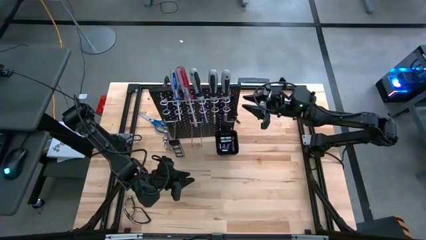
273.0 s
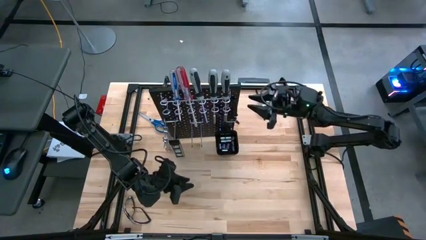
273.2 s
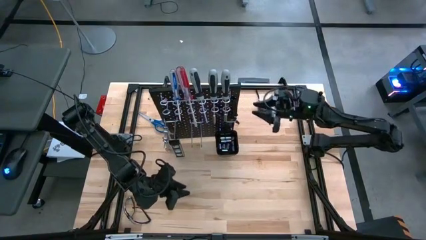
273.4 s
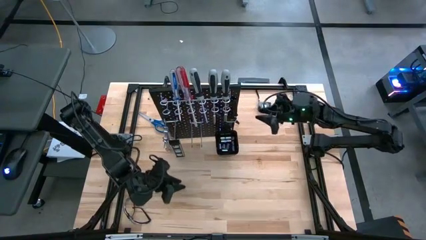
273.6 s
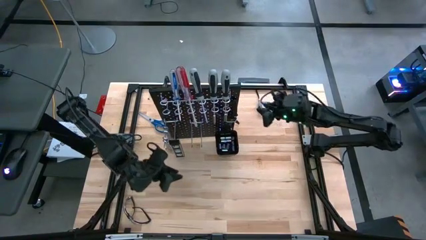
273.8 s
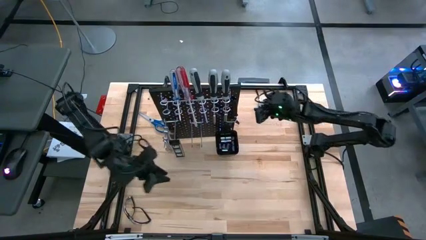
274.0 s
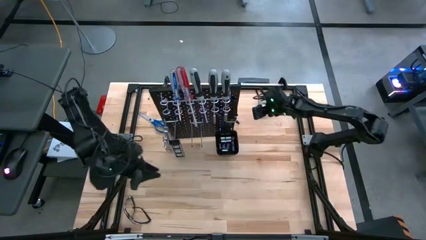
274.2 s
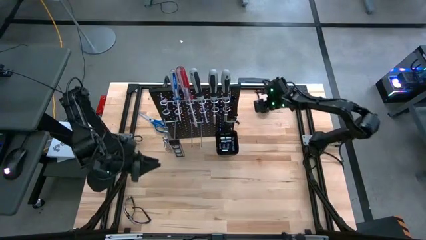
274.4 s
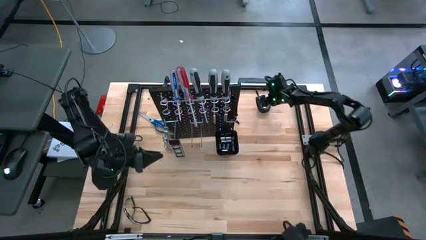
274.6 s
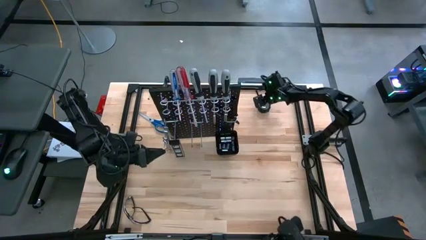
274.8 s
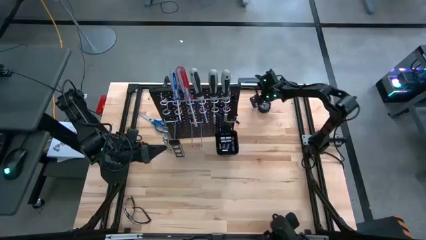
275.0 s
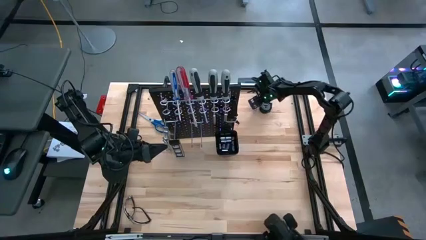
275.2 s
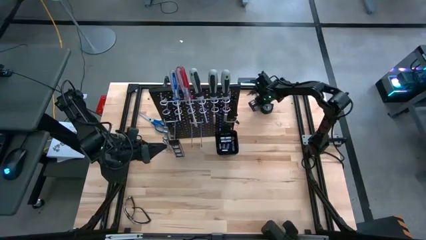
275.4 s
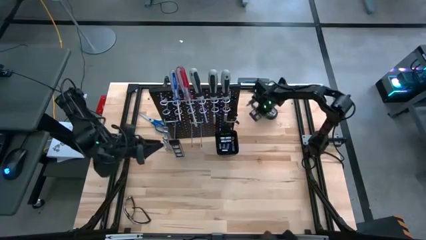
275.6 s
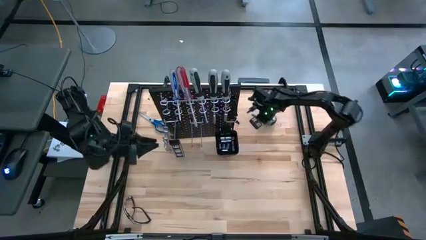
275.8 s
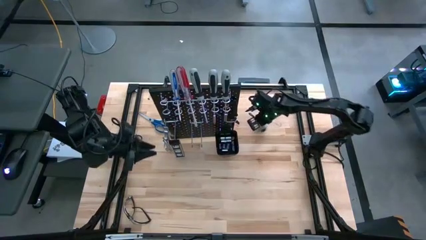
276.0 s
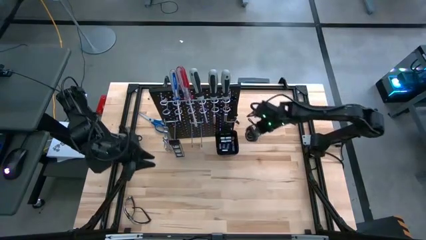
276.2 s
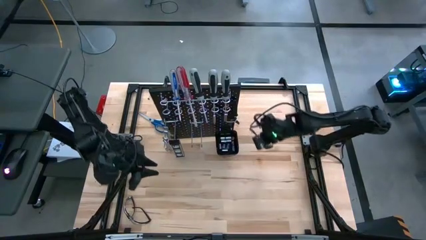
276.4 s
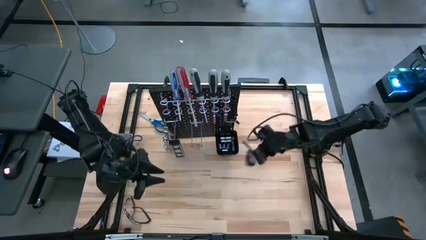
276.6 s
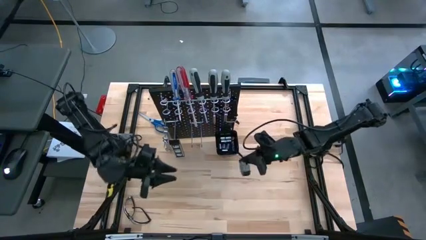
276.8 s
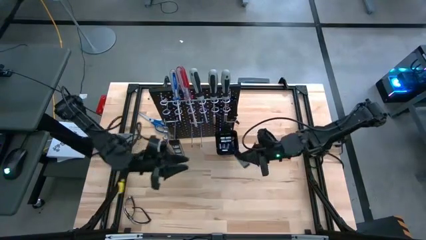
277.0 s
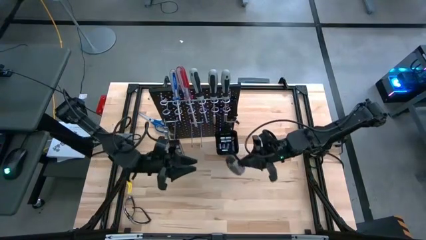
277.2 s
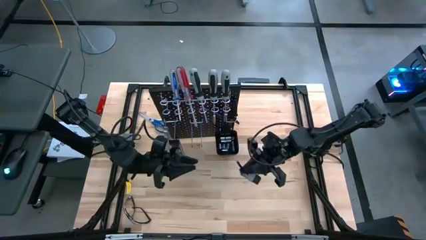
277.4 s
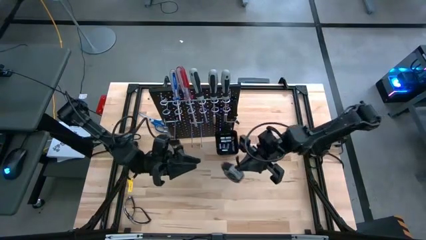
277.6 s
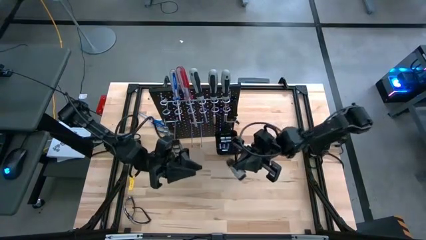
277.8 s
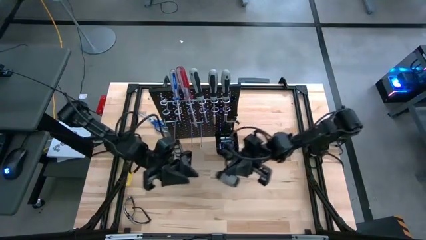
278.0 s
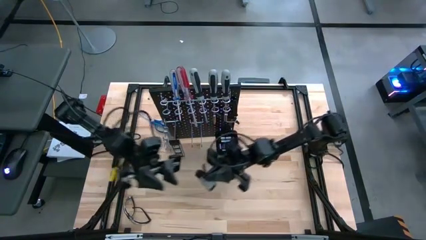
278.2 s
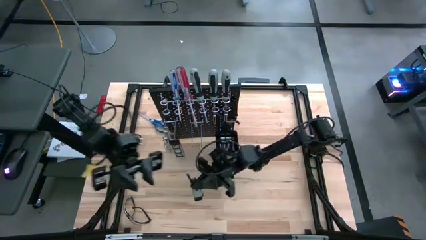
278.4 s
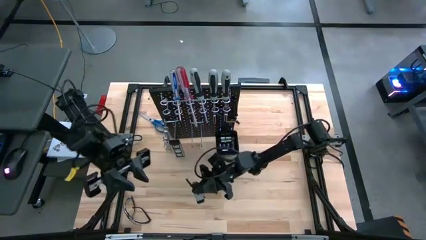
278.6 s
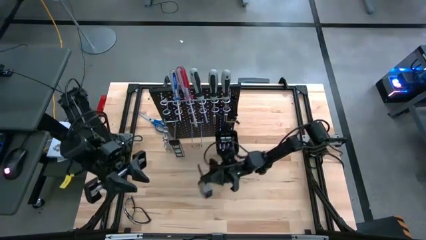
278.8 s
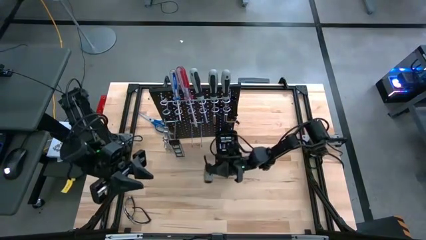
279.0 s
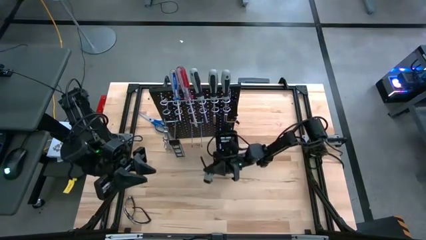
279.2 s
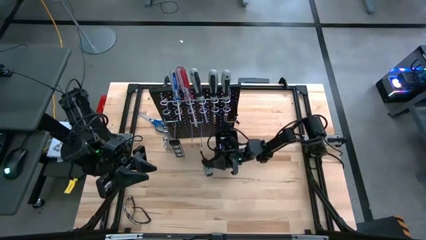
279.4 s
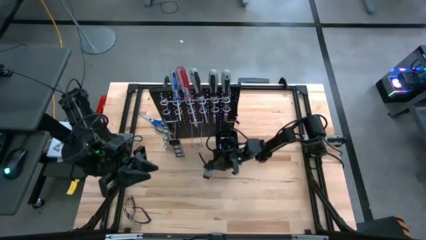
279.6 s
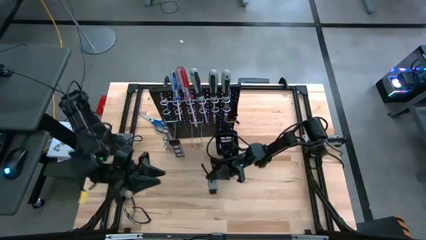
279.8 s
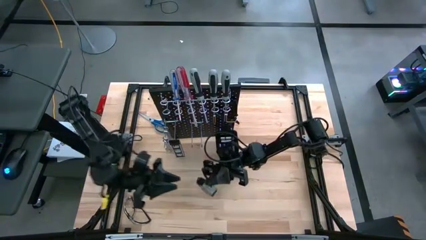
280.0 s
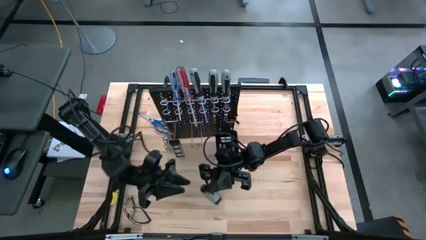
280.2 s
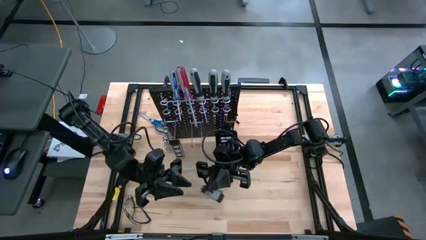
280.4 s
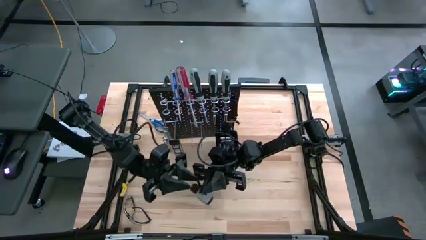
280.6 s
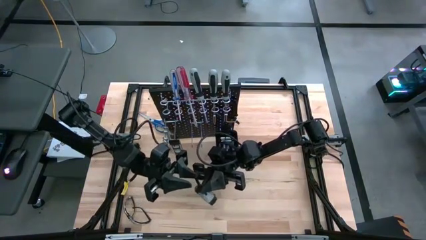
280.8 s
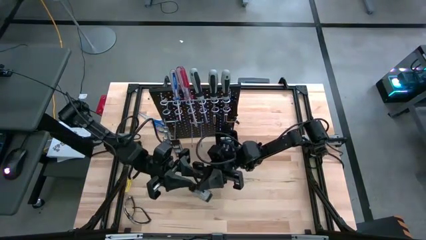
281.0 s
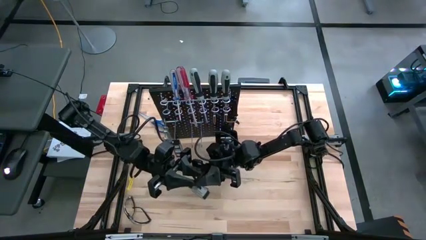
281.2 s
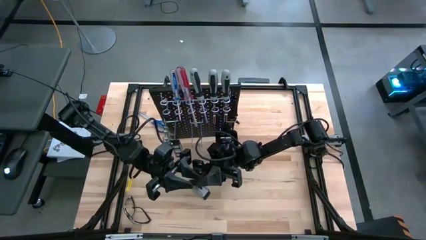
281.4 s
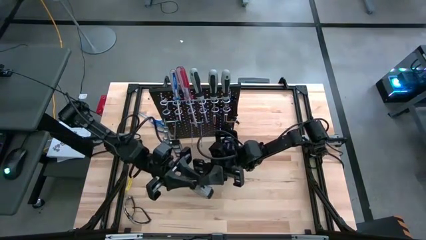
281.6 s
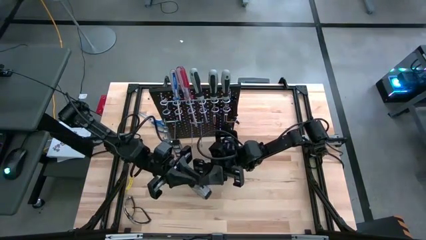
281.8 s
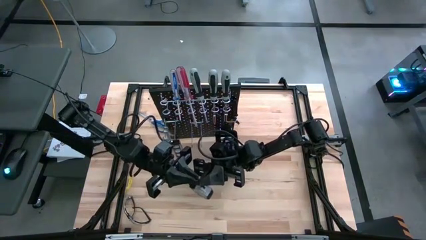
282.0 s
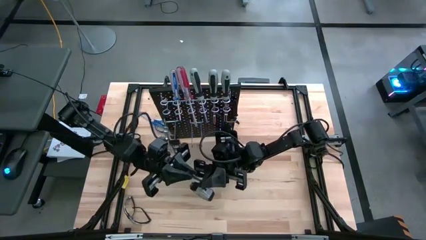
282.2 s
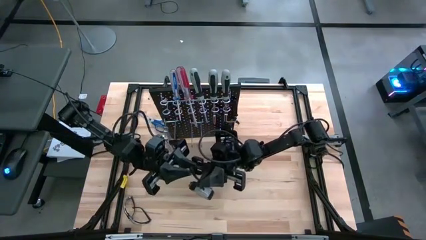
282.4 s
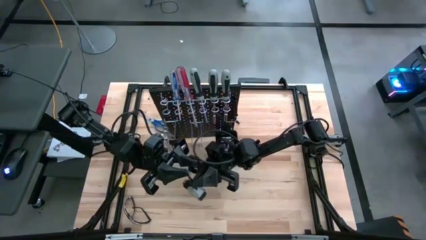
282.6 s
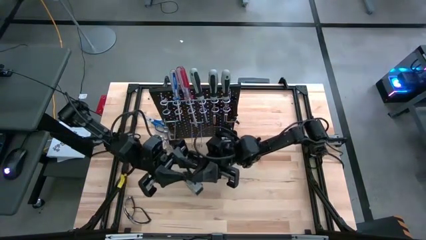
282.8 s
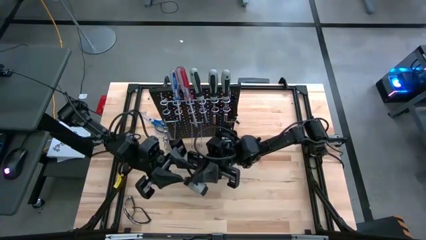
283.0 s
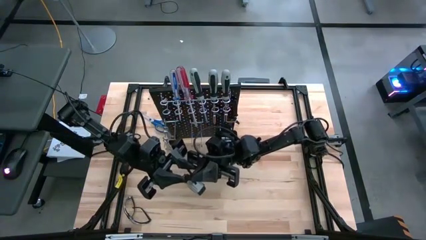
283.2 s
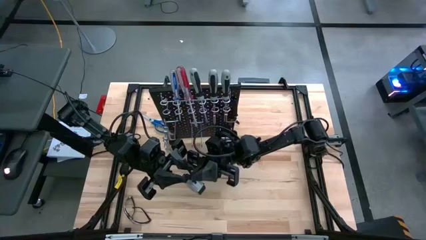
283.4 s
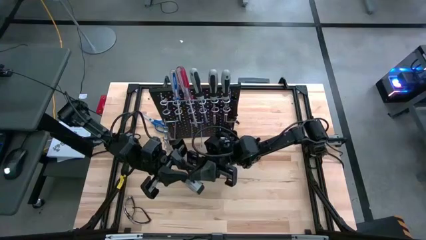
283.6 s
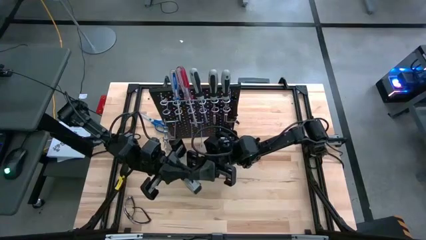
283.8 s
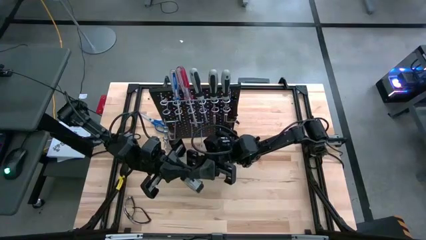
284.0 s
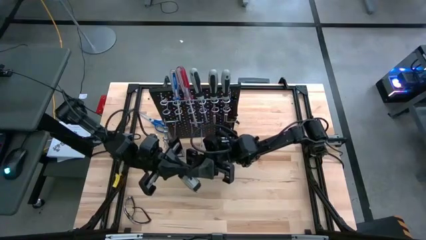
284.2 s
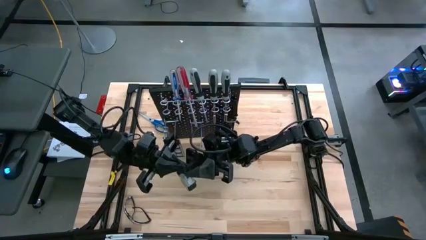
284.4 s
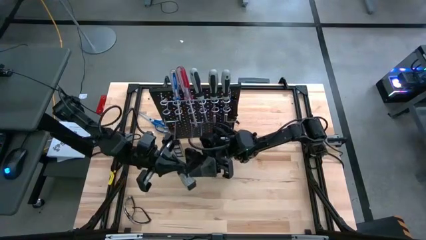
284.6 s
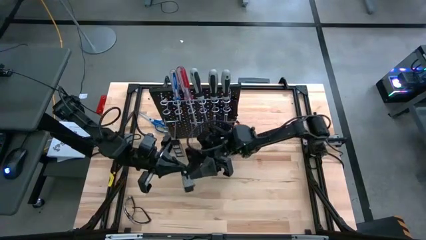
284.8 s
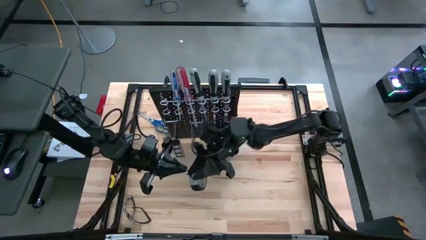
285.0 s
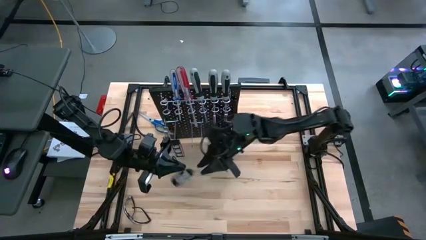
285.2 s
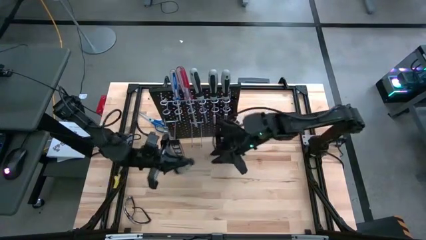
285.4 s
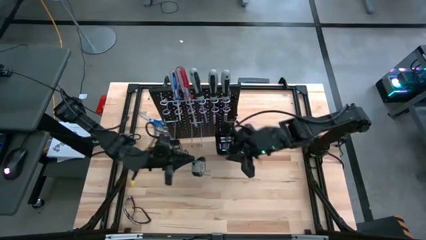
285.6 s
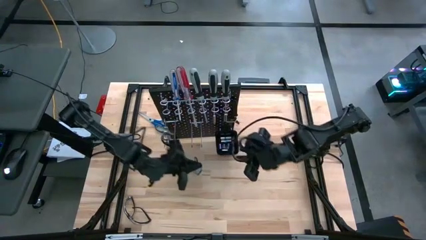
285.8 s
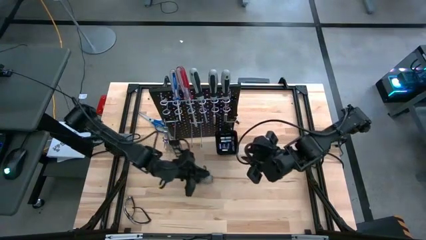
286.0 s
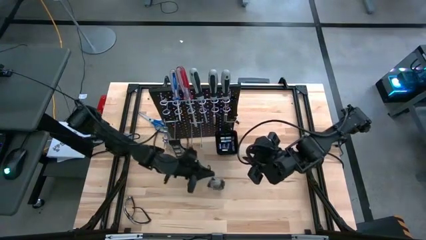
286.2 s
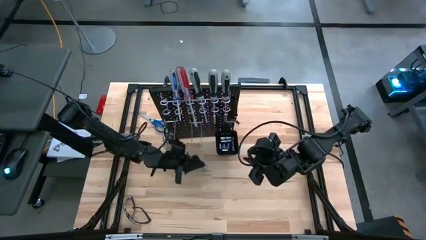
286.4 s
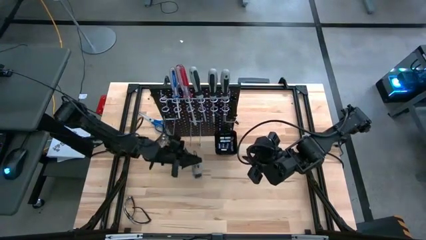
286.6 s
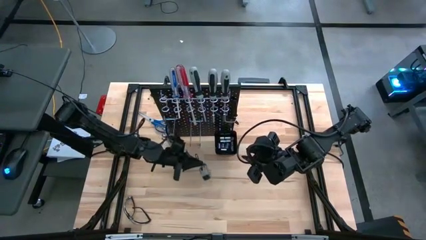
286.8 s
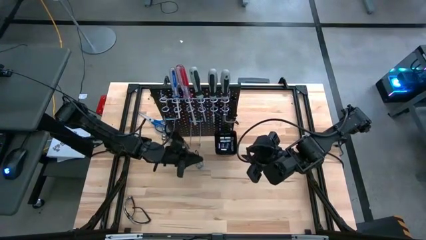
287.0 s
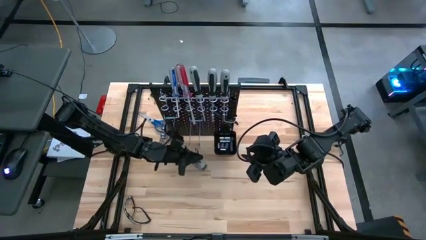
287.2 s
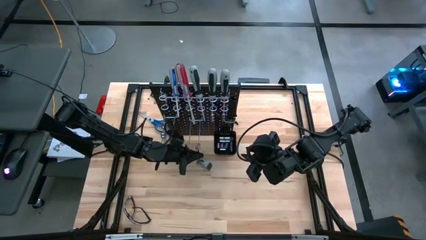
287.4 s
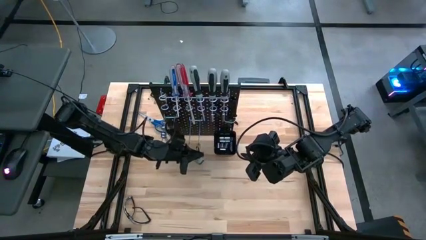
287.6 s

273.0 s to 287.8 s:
Task: Hang tools onto peg board
Hang the gray tape measure on the pegboard

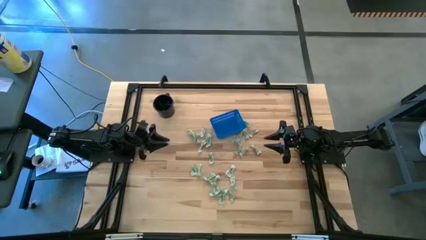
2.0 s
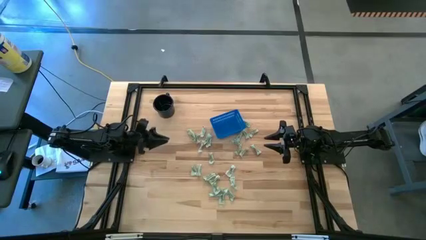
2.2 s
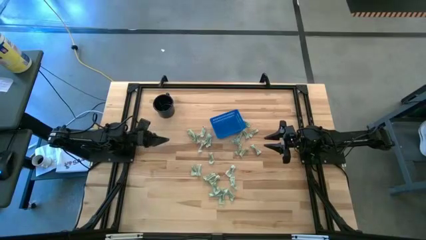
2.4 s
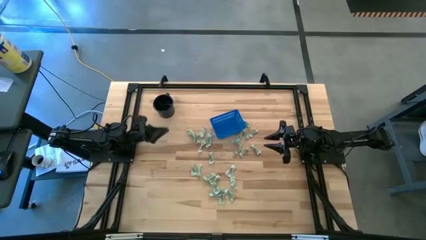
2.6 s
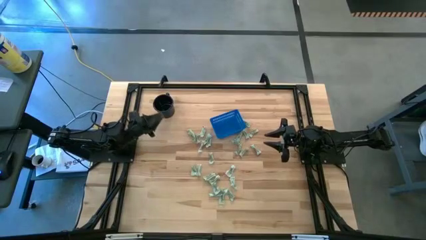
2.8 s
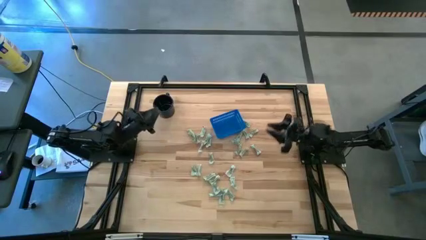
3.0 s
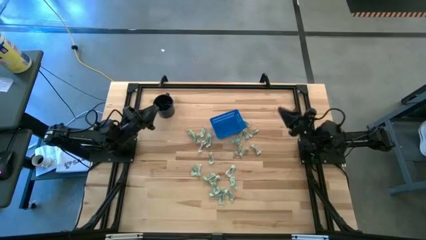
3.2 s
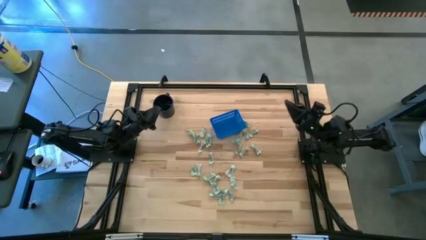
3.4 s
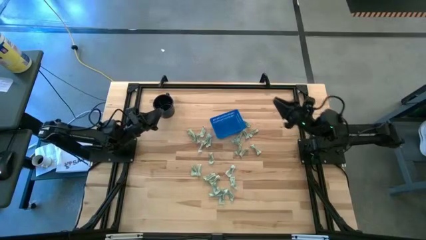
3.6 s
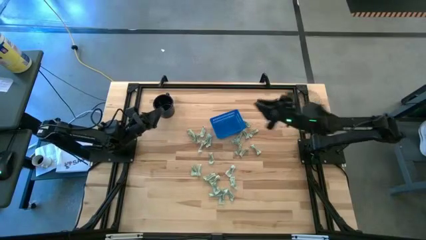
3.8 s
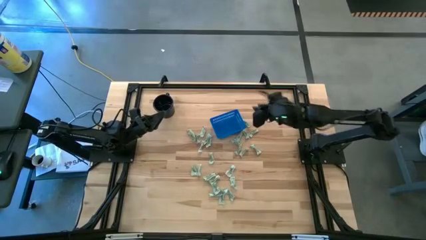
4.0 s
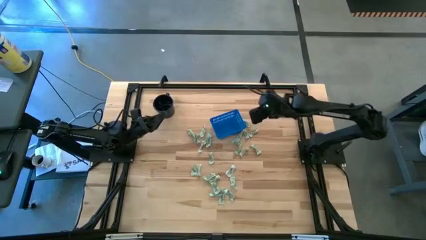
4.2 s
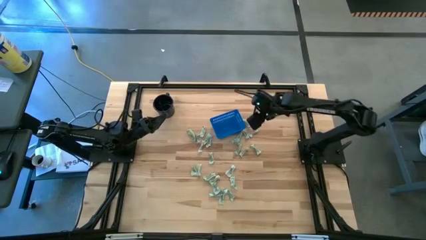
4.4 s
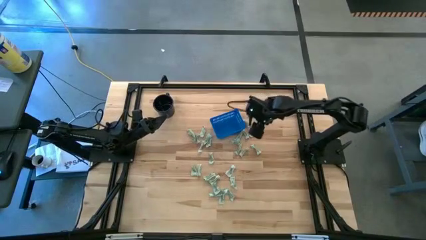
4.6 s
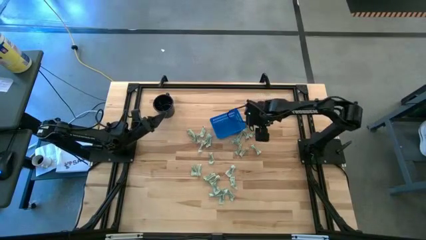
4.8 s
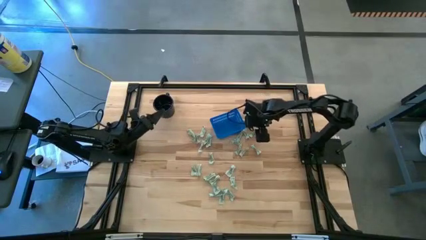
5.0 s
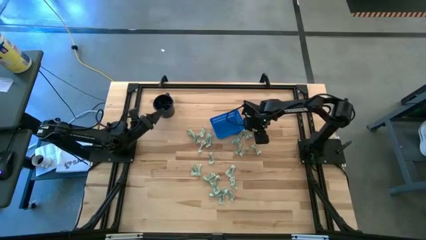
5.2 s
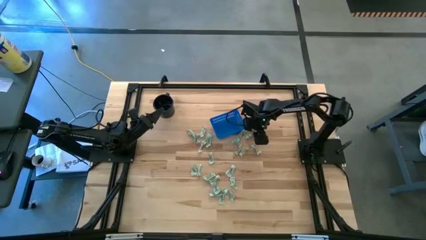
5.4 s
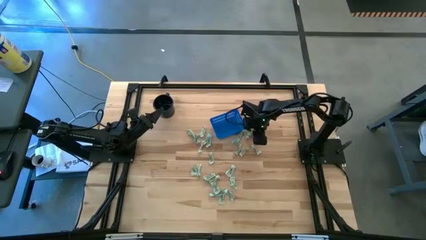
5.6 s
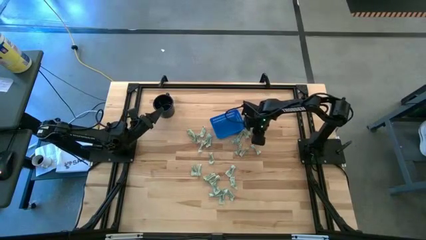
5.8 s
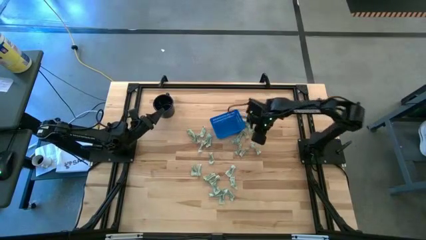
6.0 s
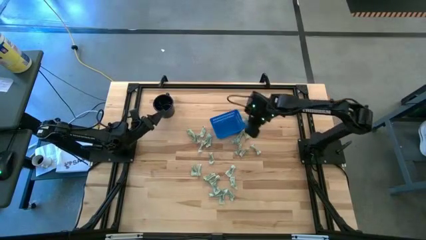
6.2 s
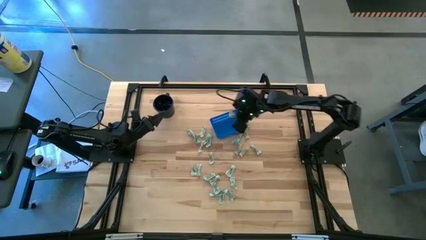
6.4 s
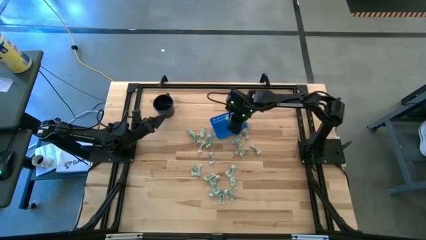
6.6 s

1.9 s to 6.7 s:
Task: Pick and place Stevia / Truvia into bins
Put the green stevia packet into the blue bin
